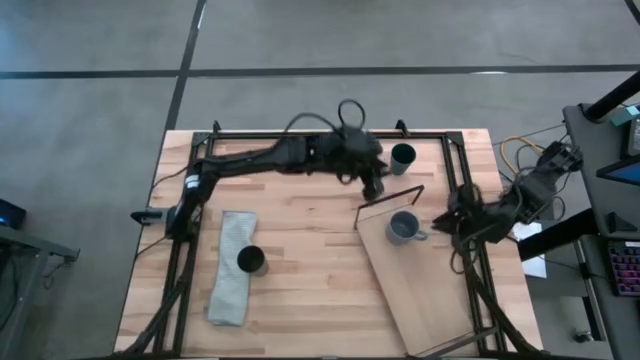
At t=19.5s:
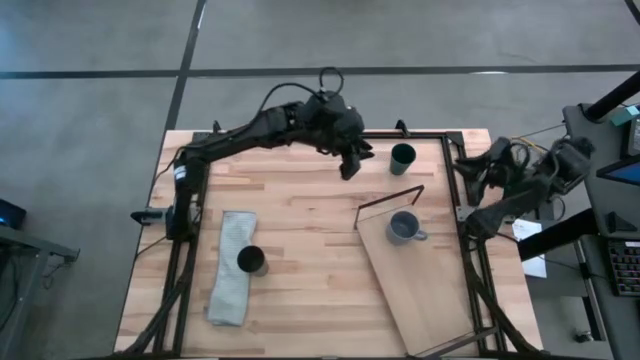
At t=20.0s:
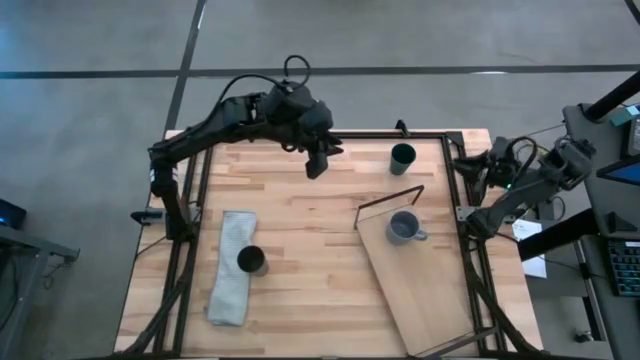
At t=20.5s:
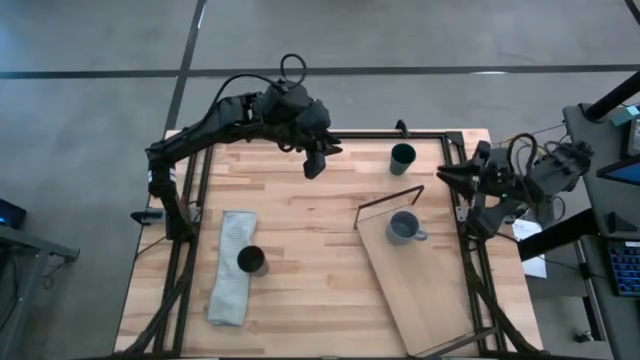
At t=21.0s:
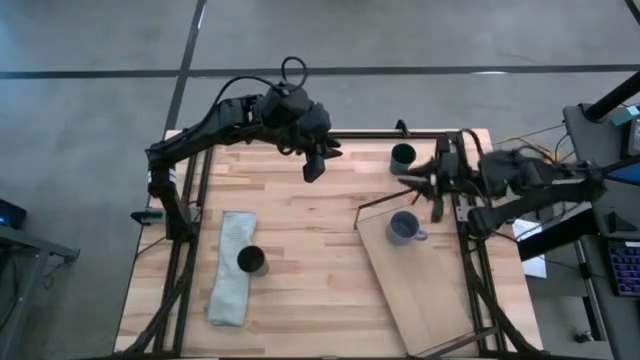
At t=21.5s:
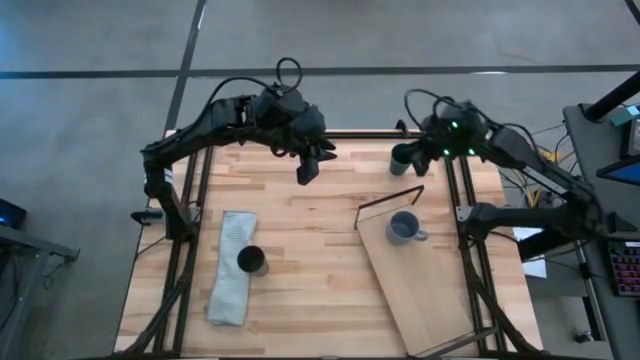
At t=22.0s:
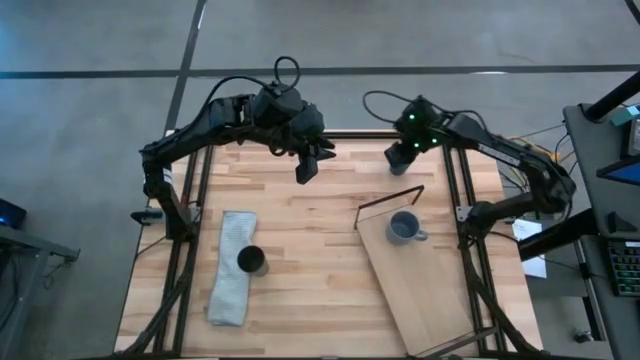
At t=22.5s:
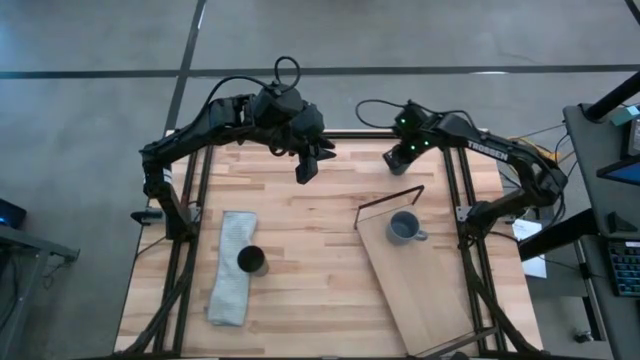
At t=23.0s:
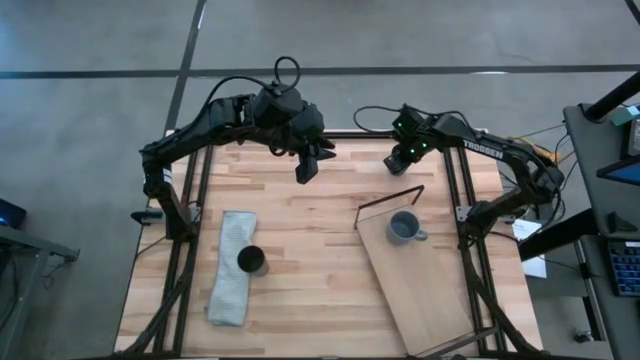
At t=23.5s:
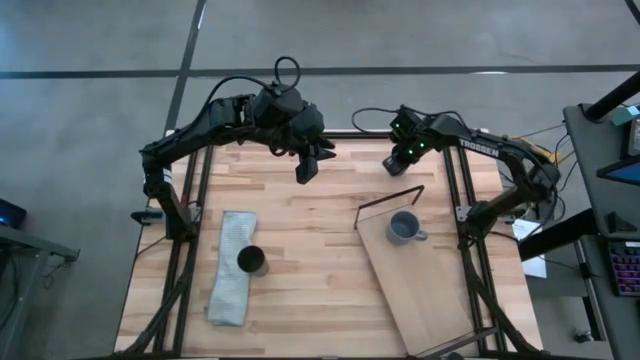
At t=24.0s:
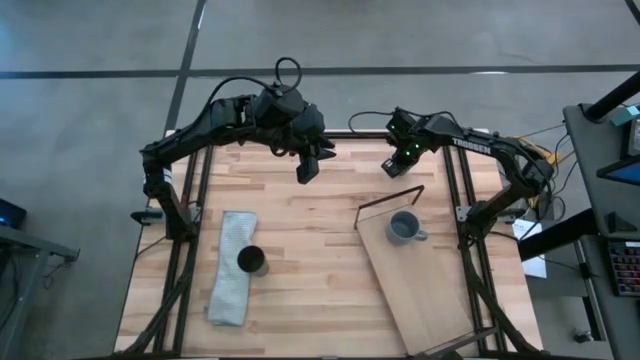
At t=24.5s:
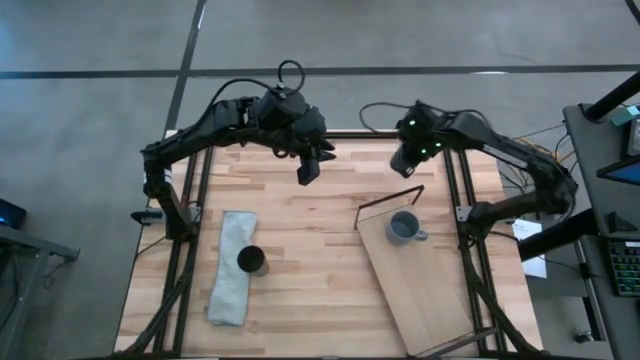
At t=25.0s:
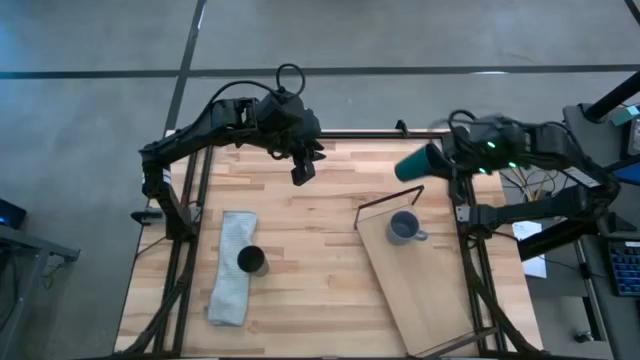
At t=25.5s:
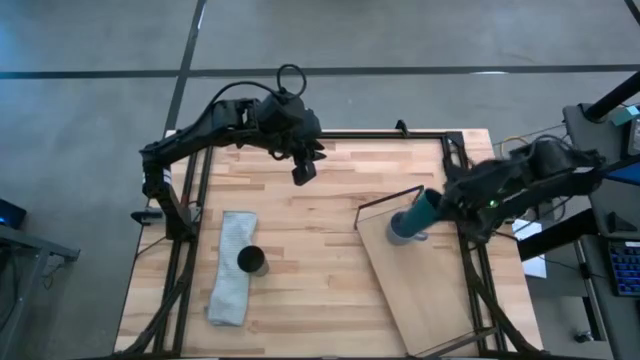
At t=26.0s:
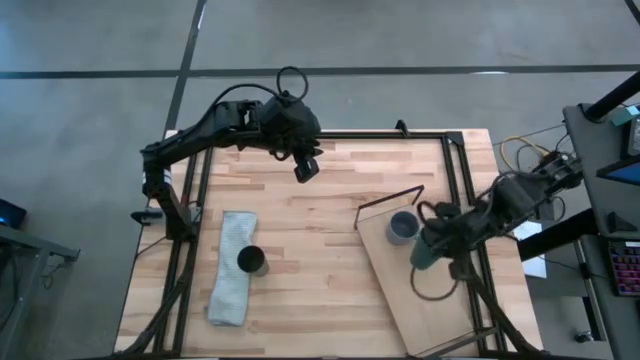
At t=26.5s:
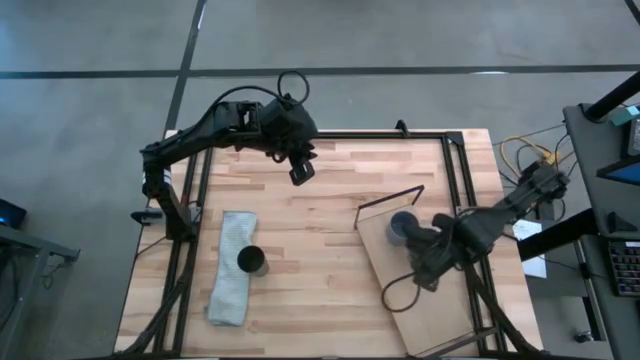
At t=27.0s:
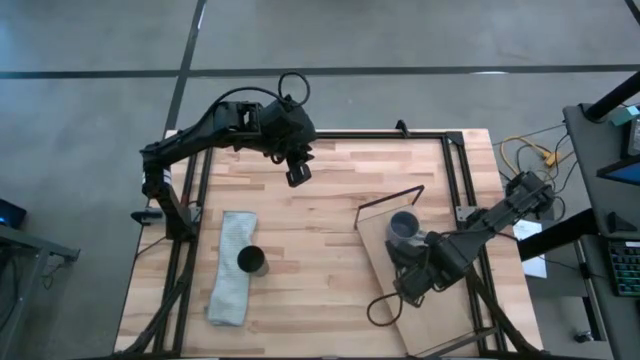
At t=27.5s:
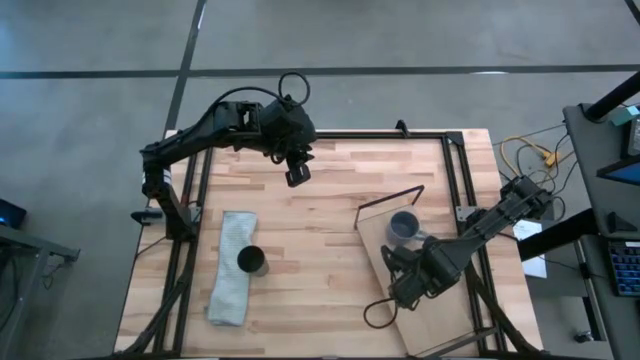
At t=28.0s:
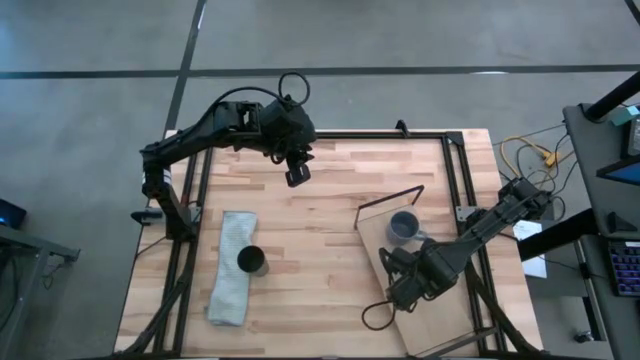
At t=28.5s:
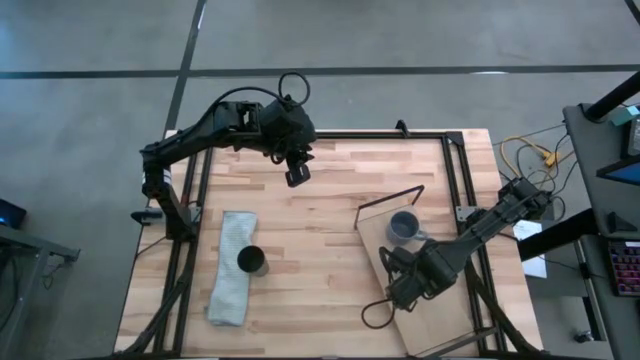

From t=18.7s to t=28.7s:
Task: Stack small to large cups/mugs on shelf
Put the blue cup on the shelf

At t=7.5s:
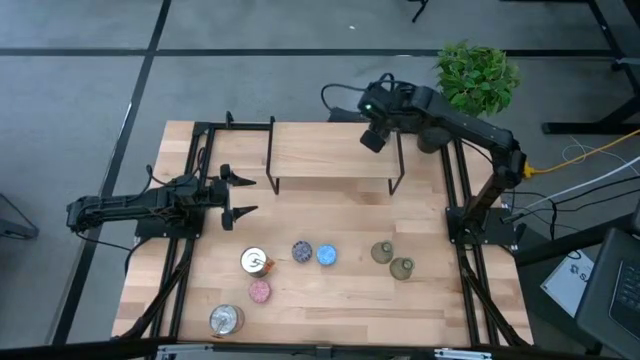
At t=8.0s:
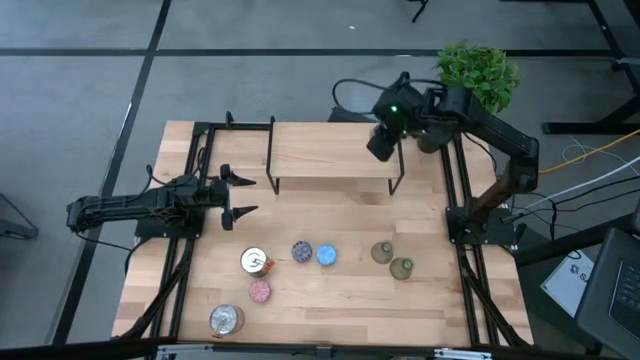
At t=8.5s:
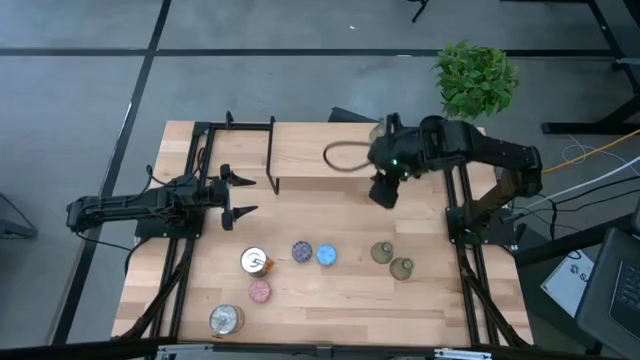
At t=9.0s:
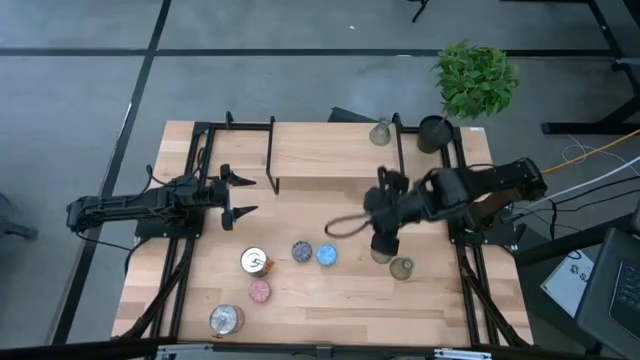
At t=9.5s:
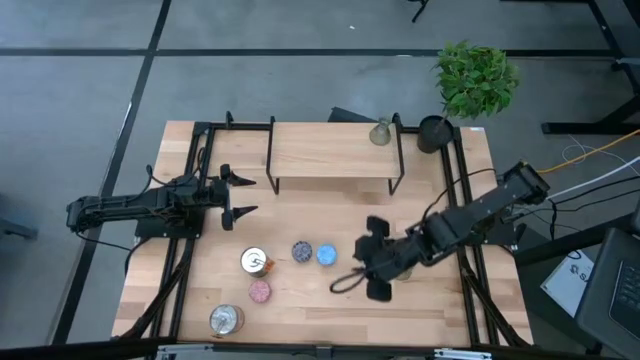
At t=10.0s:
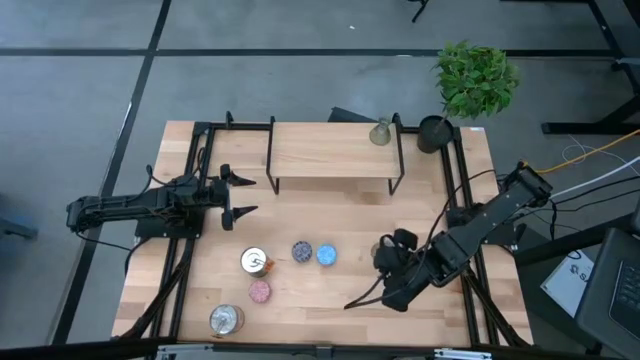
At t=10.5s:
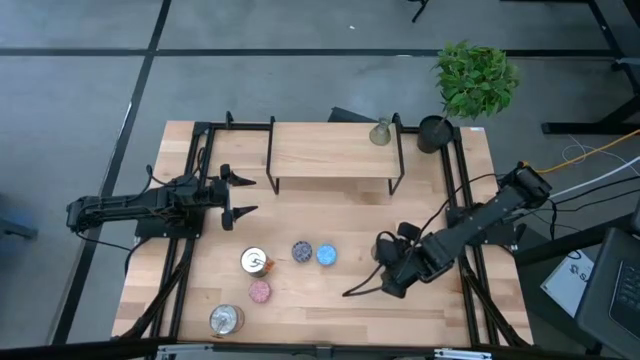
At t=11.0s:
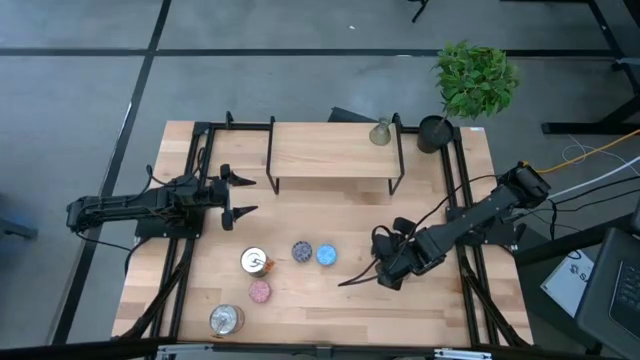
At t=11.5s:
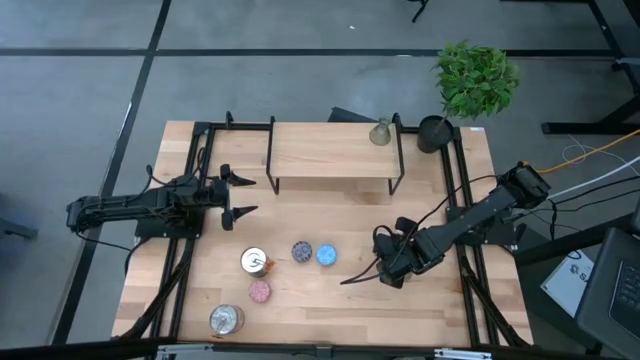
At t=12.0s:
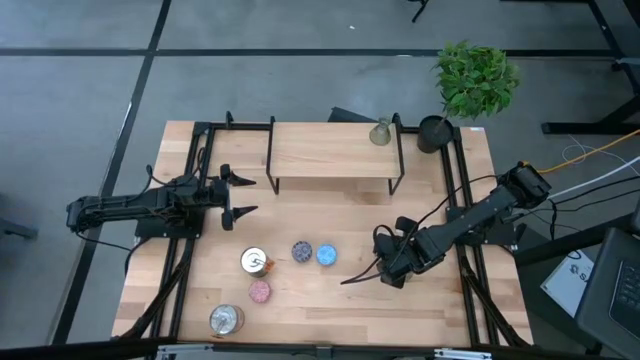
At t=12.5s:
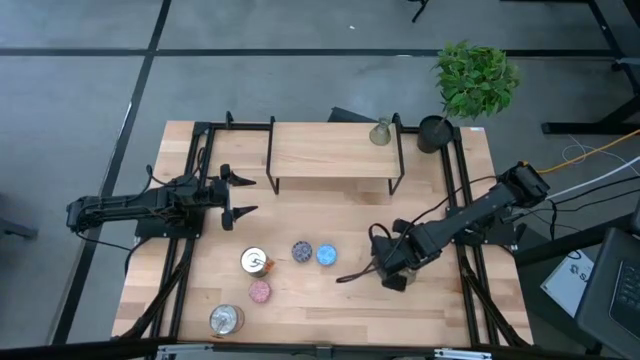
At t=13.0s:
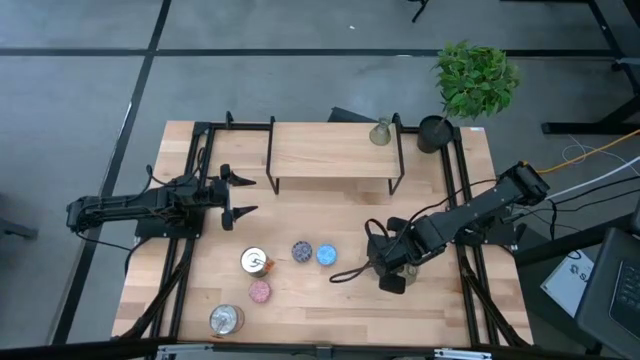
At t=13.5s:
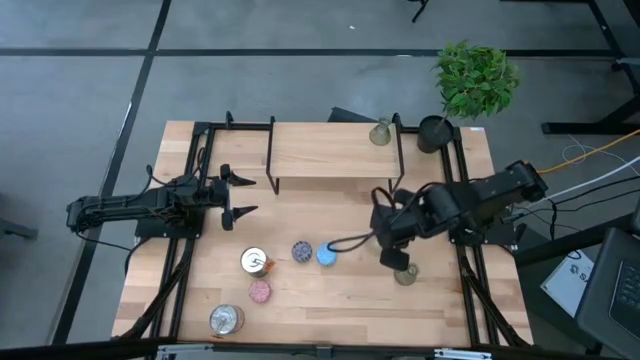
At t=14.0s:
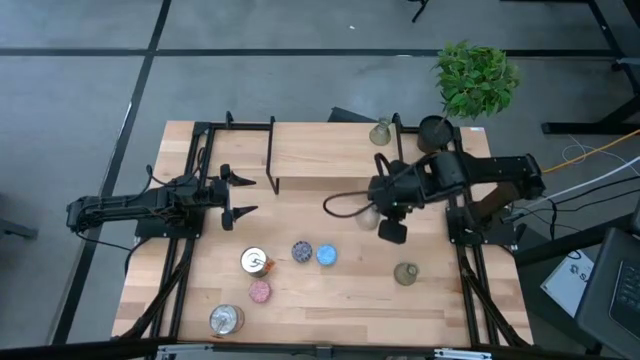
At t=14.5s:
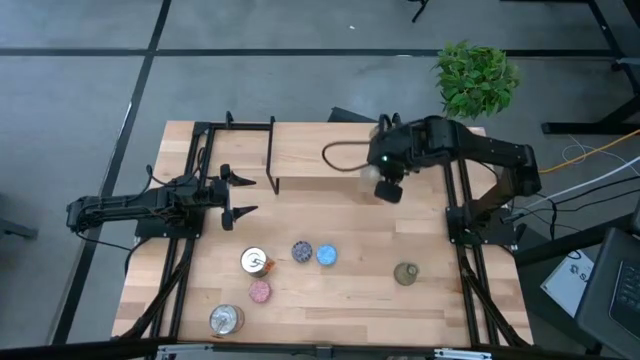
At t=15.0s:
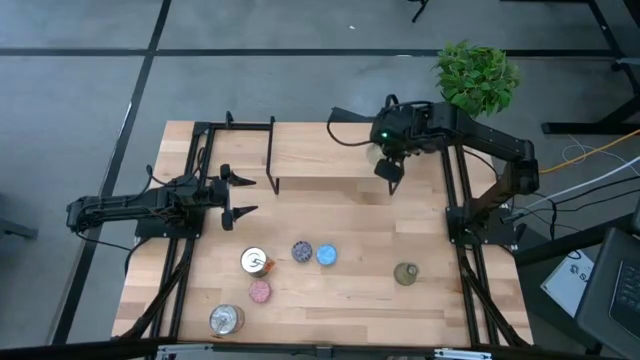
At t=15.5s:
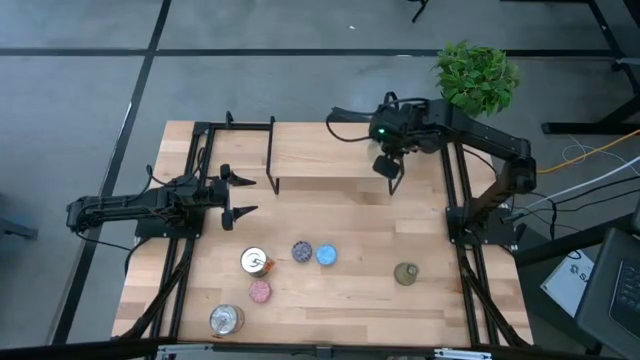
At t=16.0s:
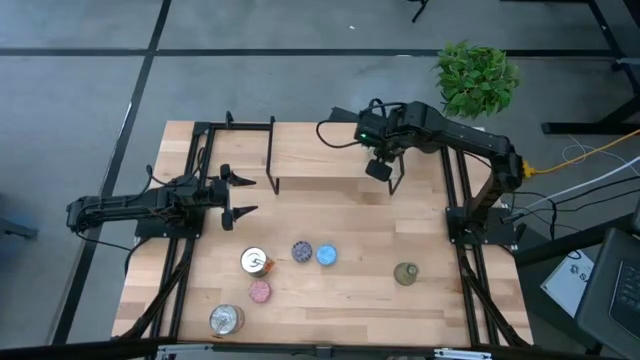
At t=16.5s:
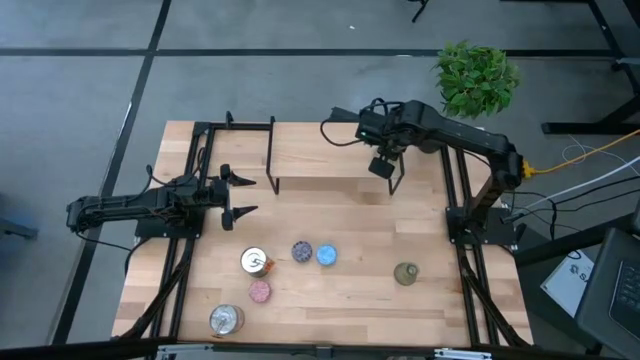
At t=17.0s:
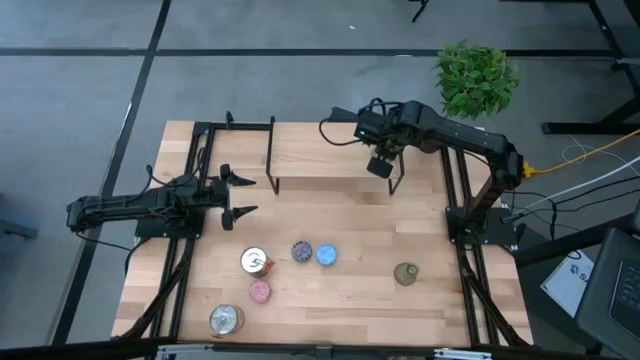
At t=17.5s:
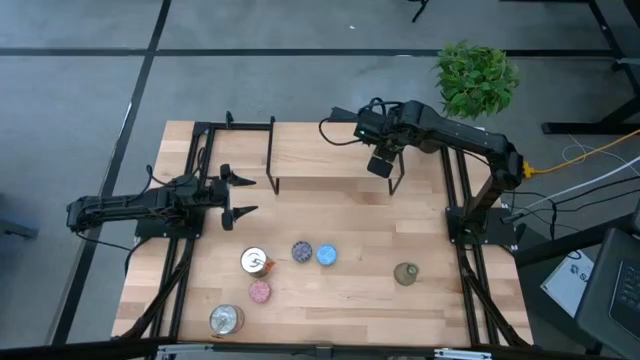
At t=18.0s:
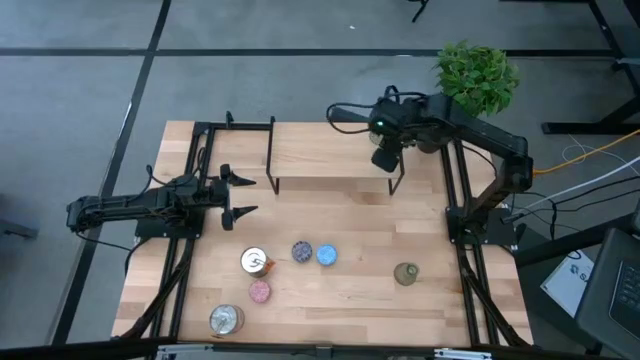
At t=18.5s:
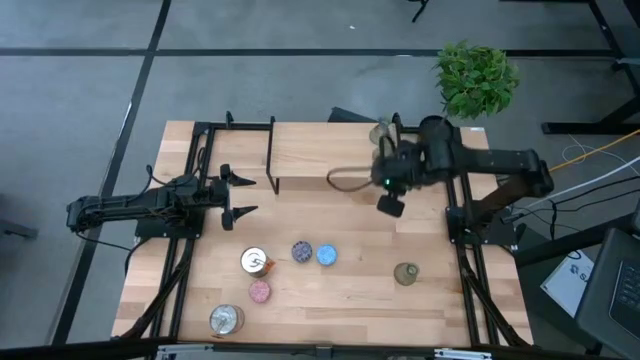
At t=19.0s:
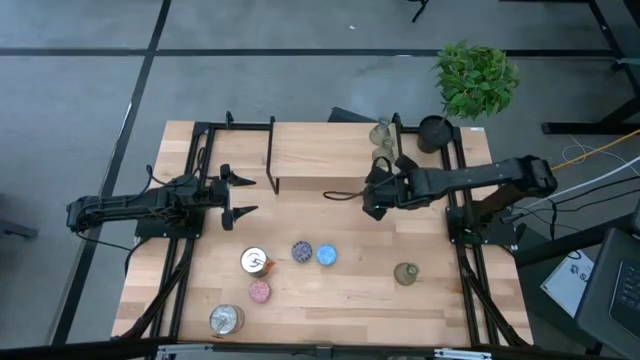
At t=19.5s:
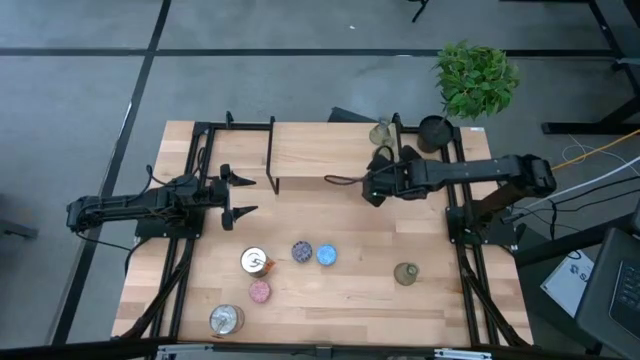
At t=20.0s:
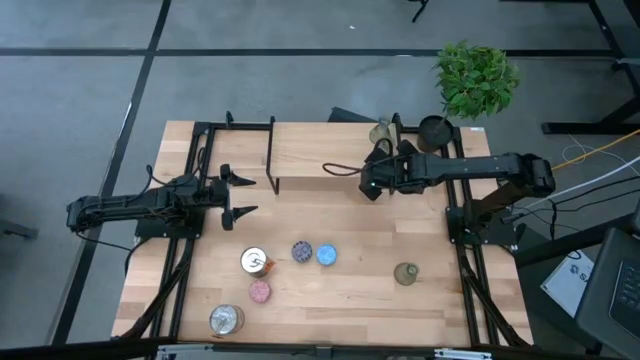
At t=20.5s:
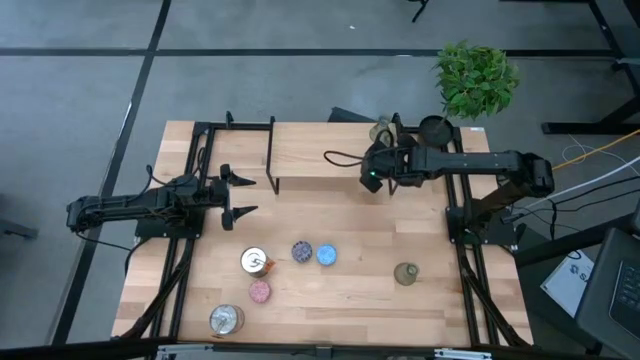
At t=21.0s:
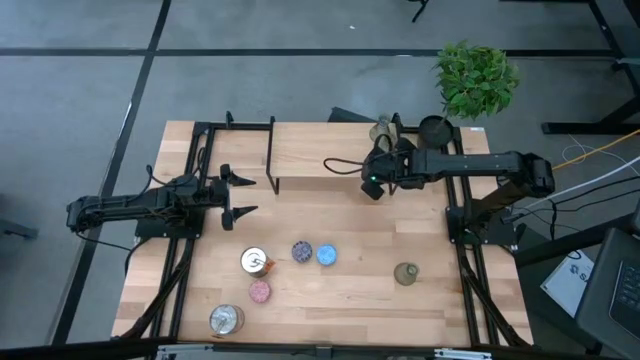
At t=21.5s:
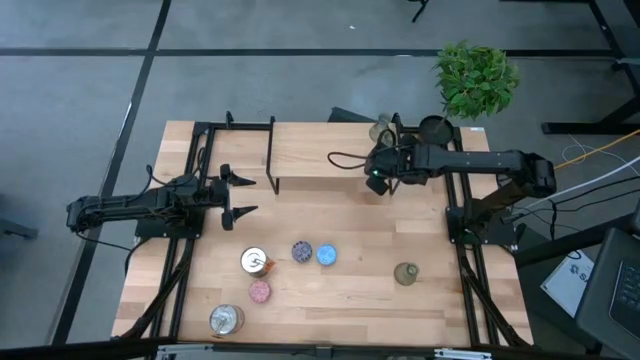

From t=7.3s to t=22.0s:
Task: Pick & Place candle stick holders
Put the top transparent glass candle holder on the shelf aligned with the other transparent glass candle holder
